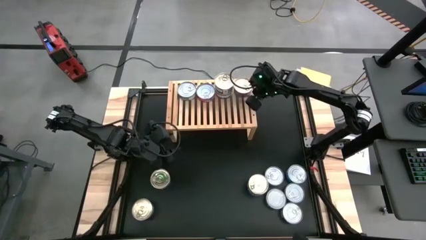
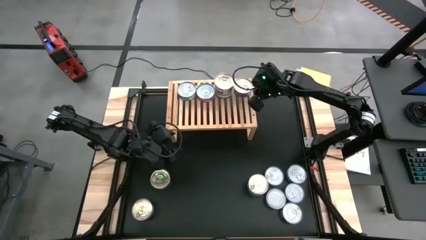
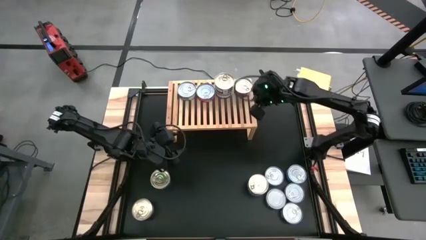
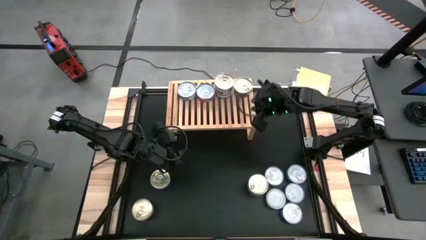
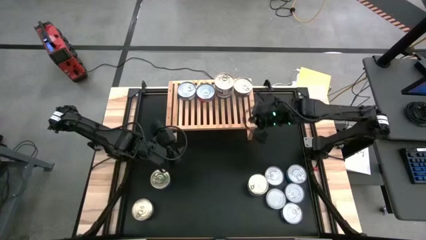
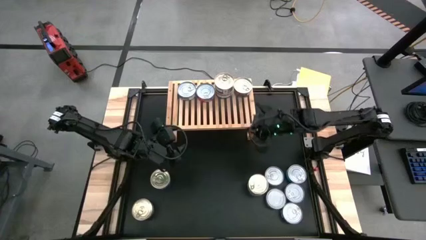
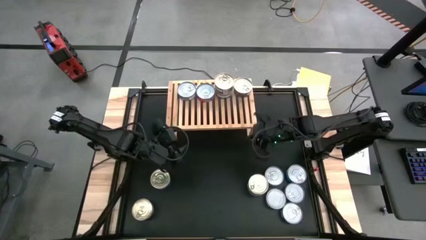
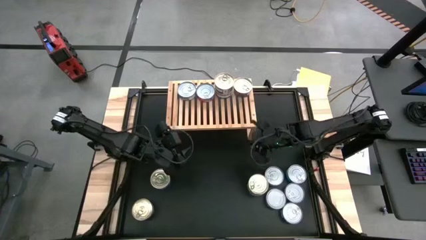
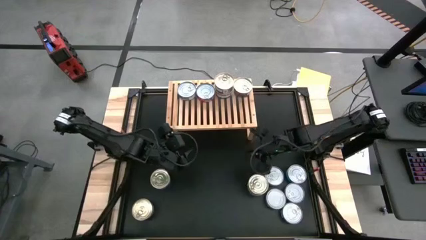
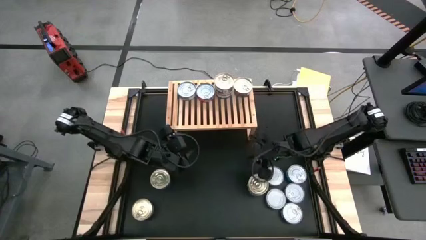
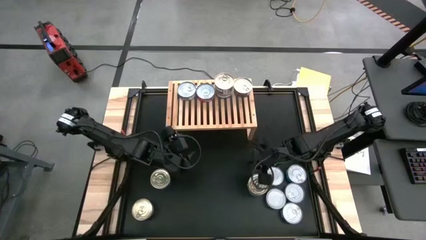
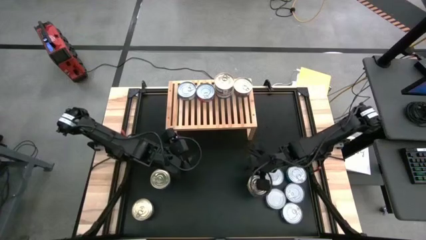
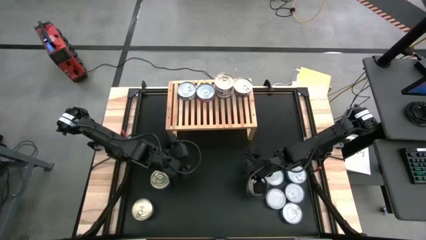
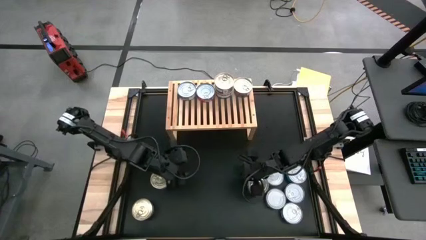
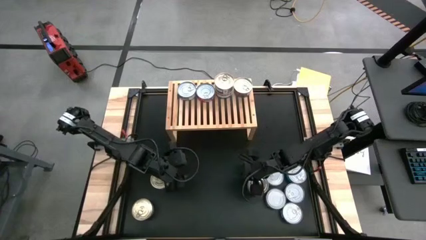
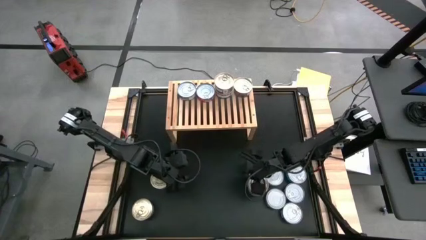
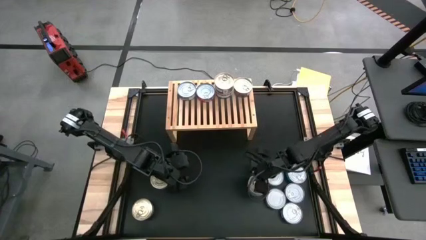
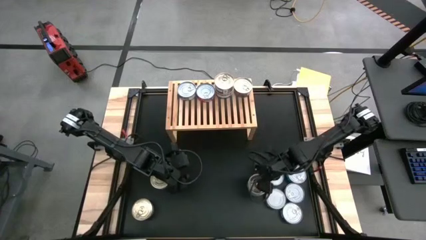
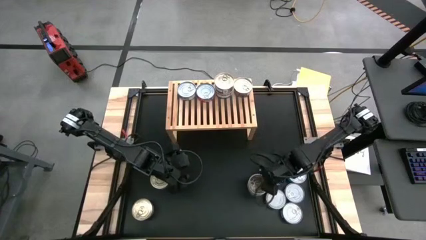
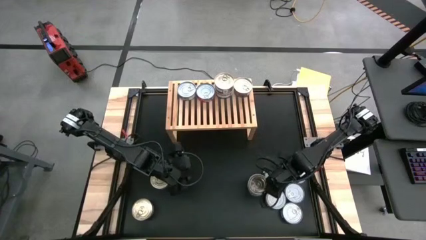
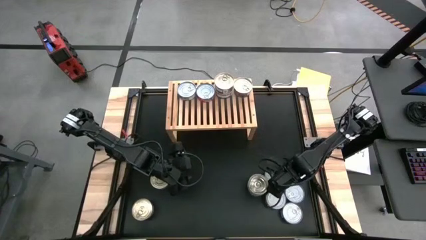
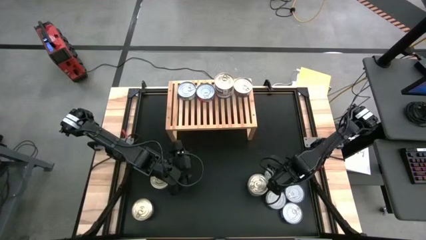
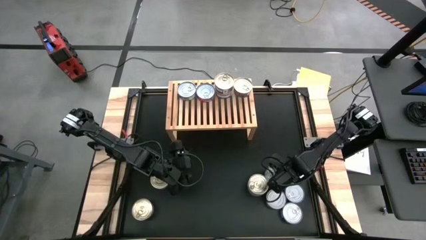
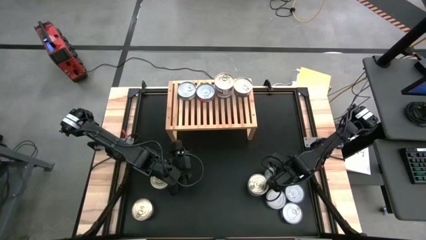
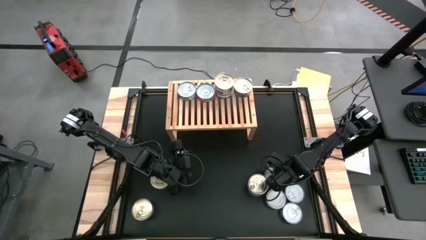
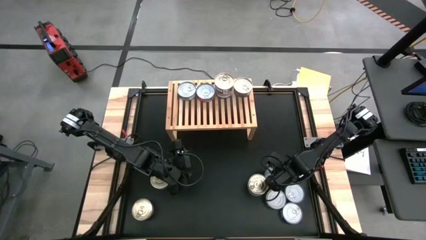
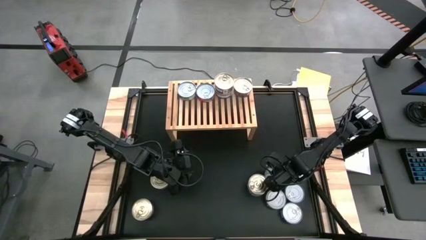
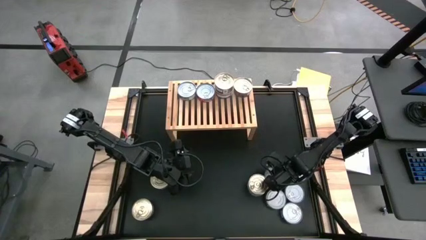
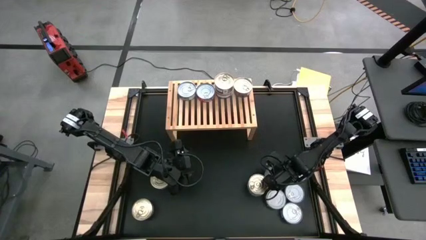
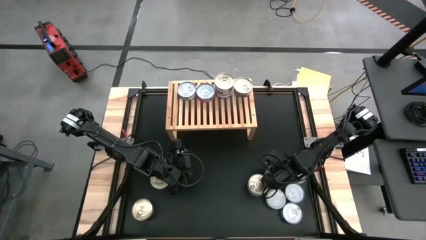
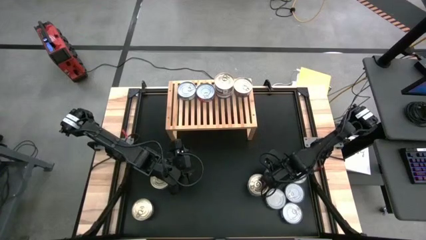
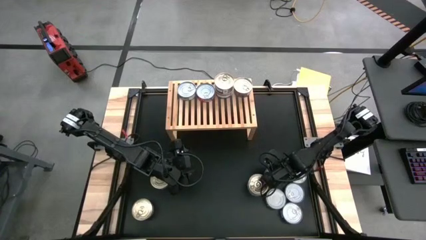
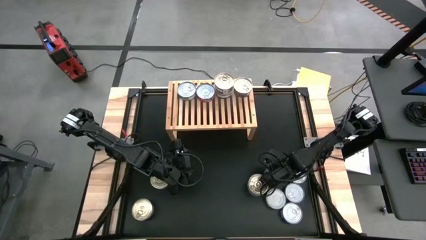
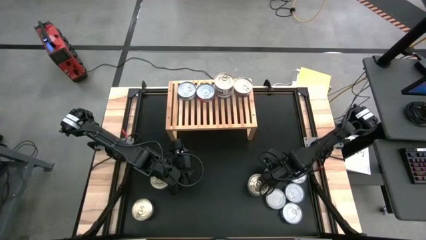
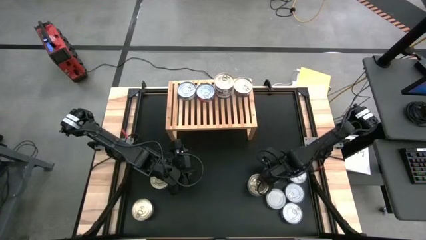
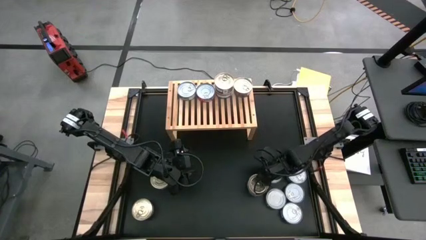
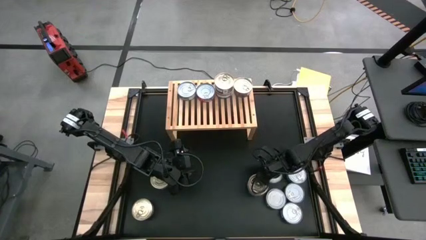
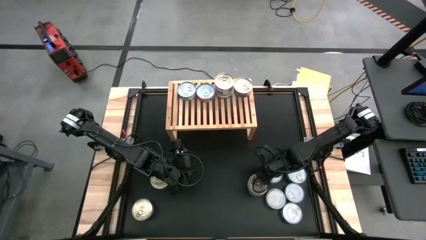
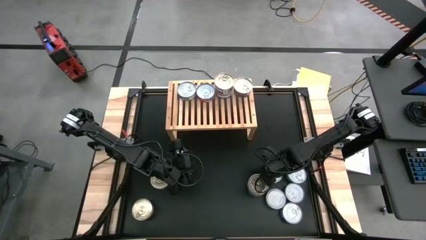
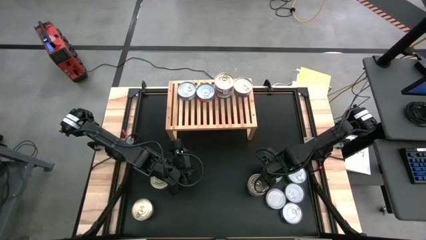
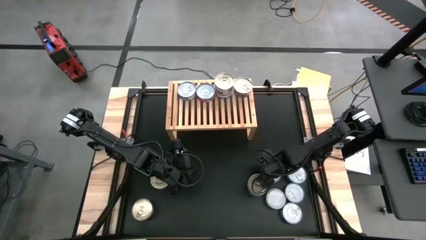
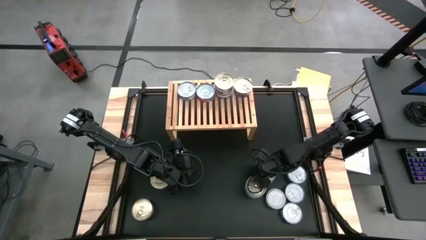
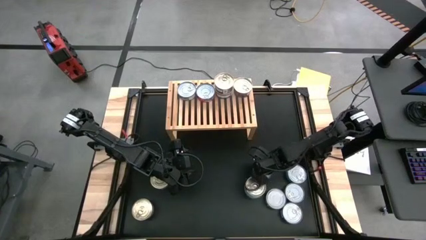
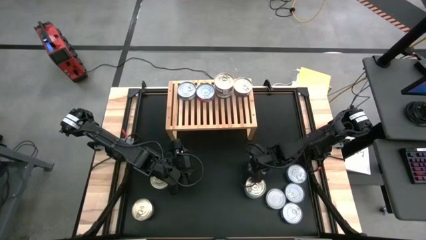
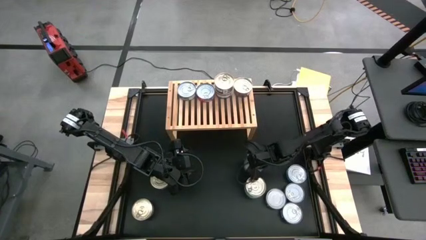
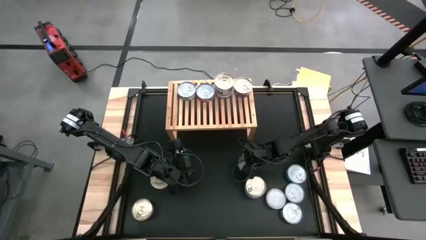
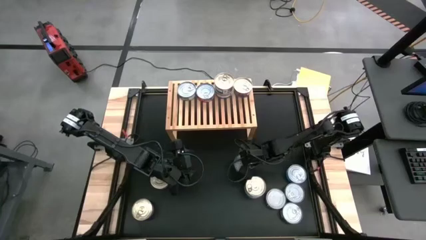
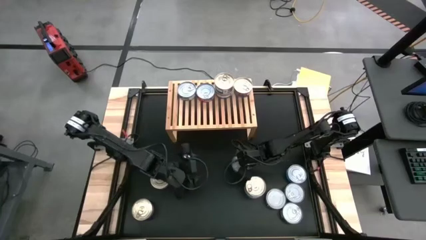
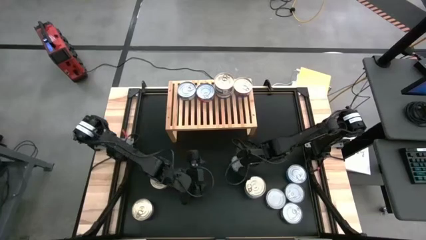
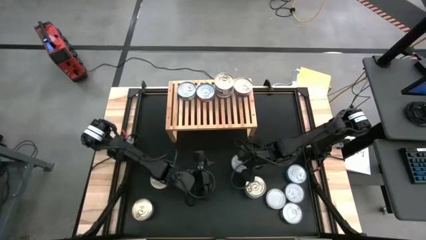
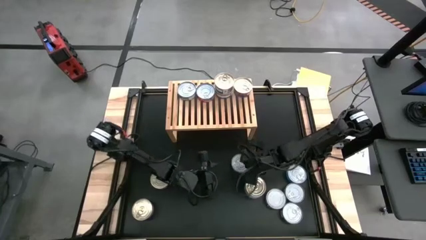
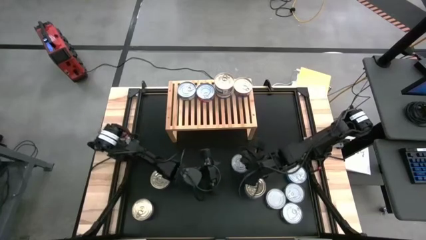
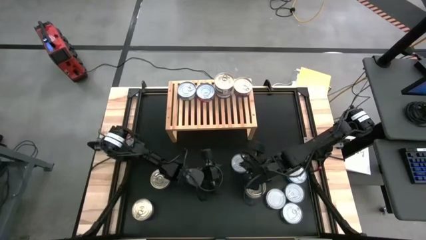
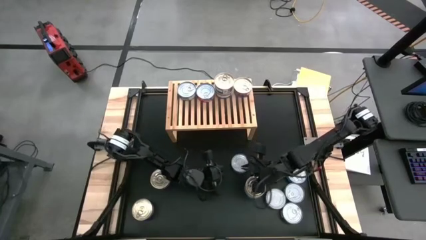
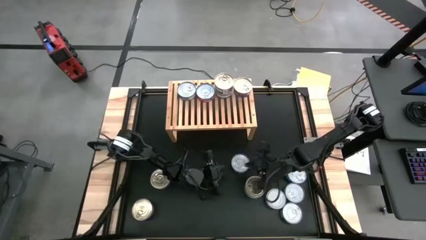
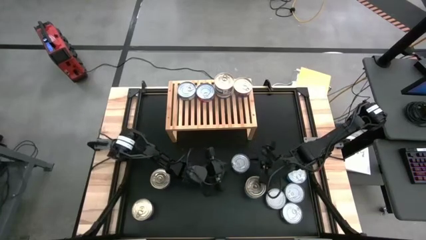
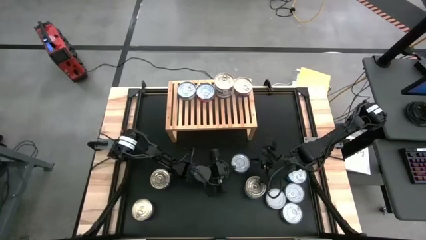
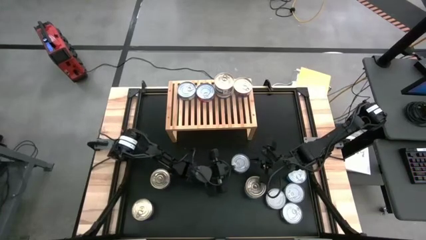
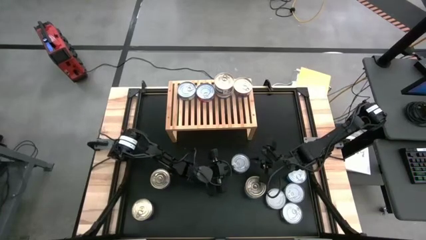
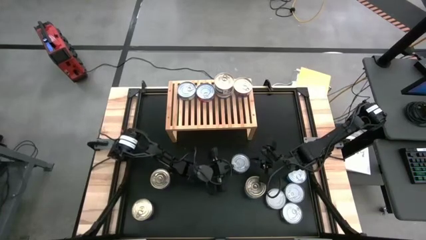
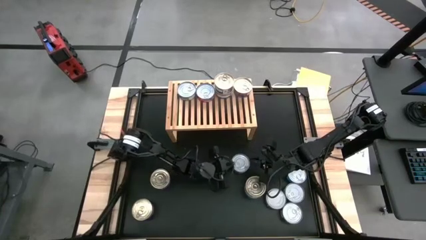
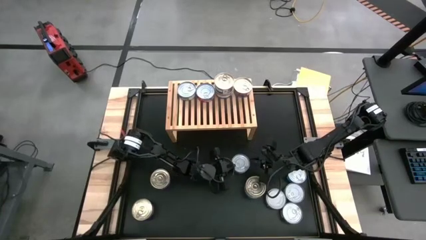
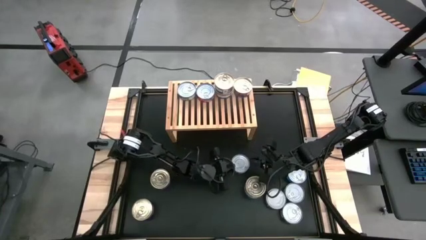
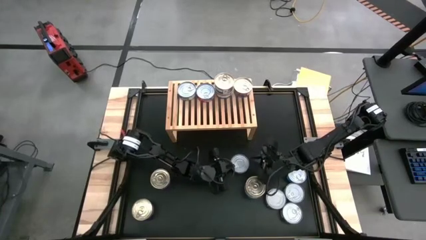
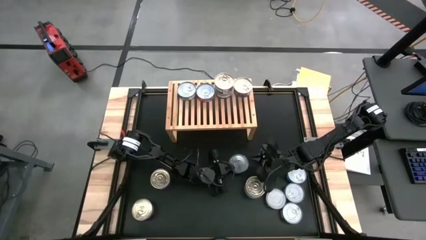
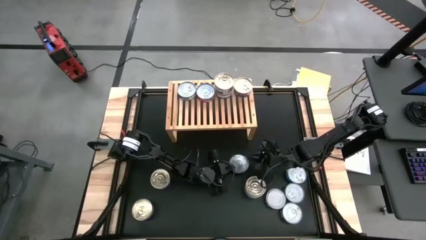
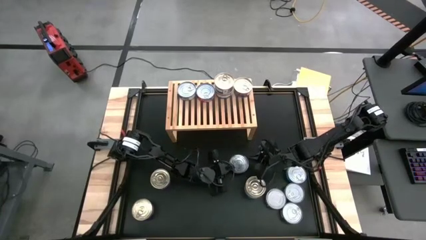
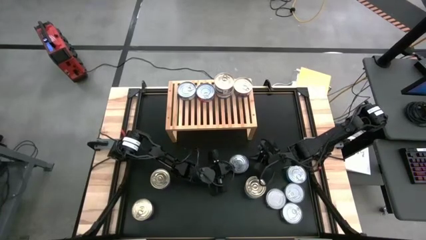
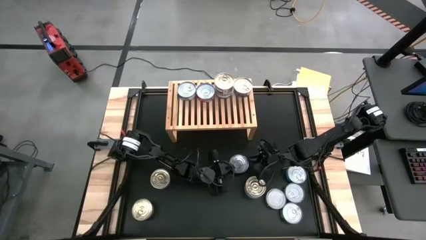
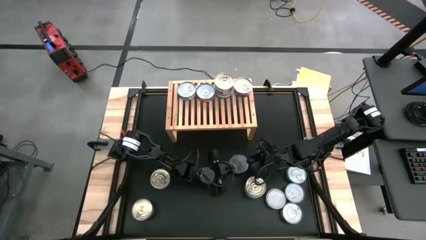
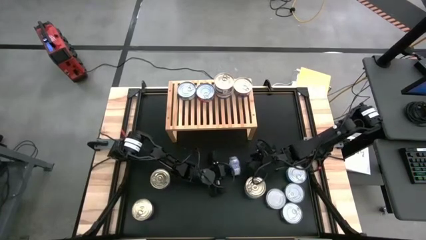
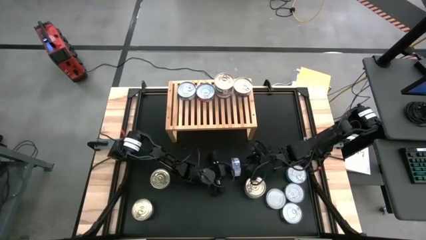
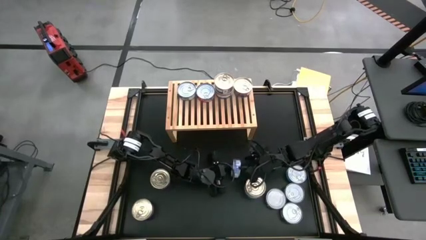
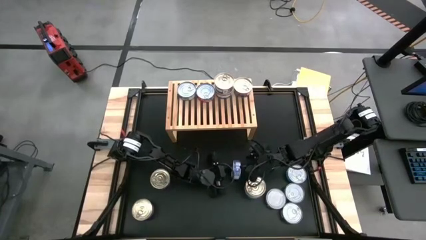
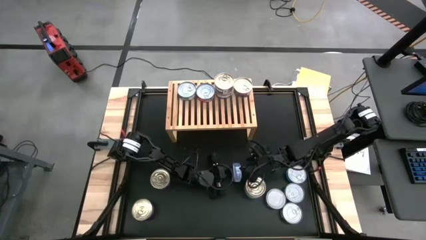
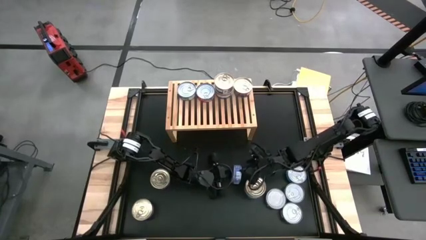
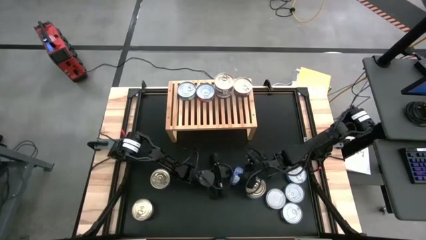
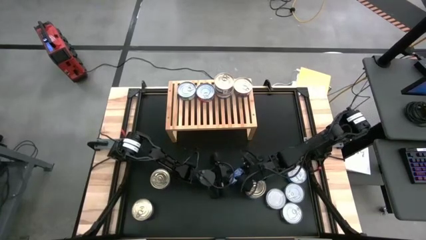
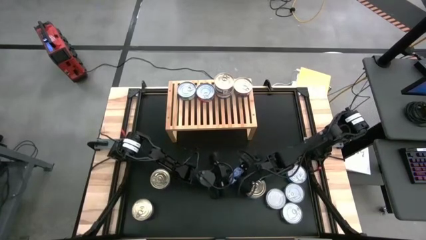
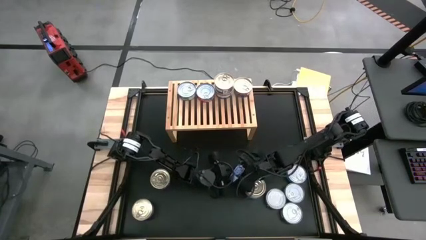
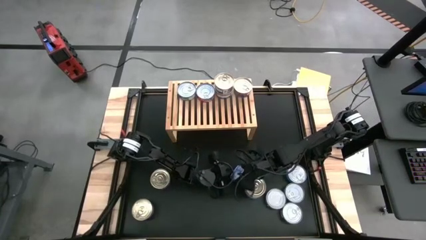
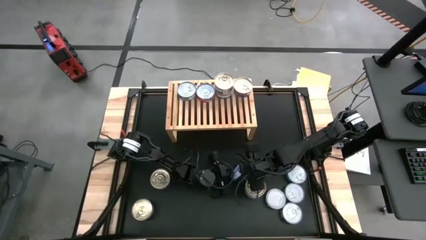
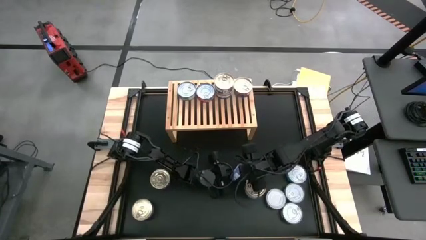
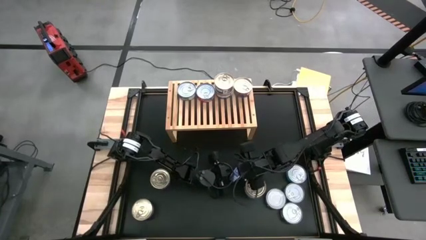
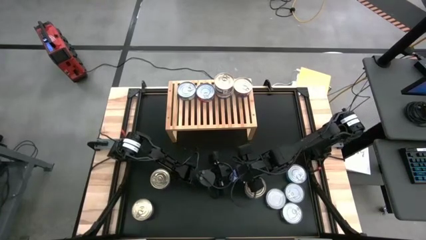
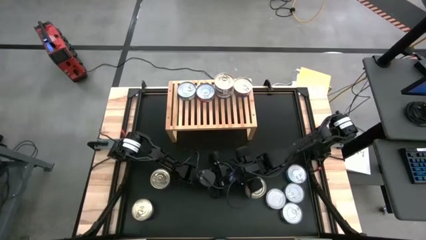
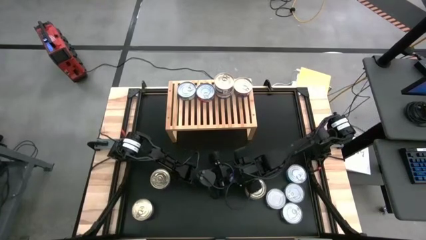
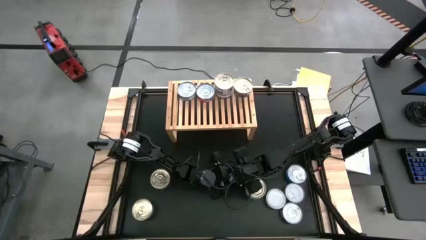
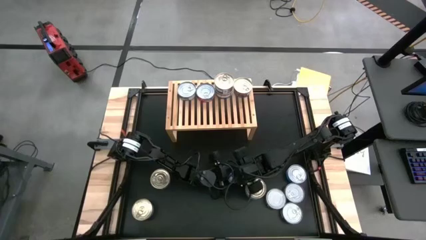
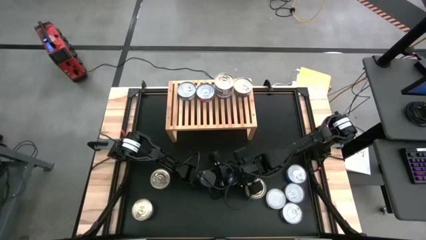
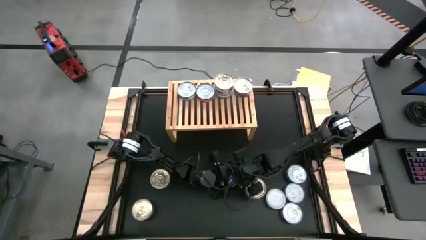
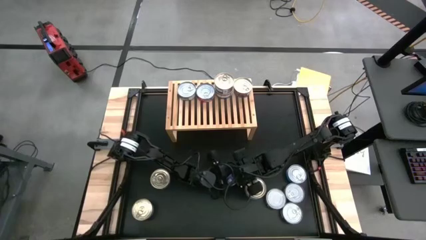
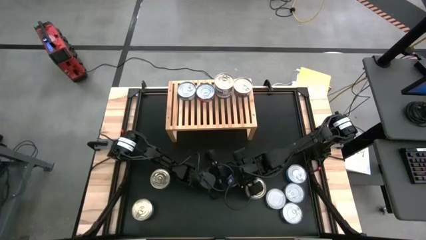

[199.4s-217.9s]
Task: Stack canned seafood by type on shelf
Put the blue tuna can on the shelf aligned with the other red tuna can
